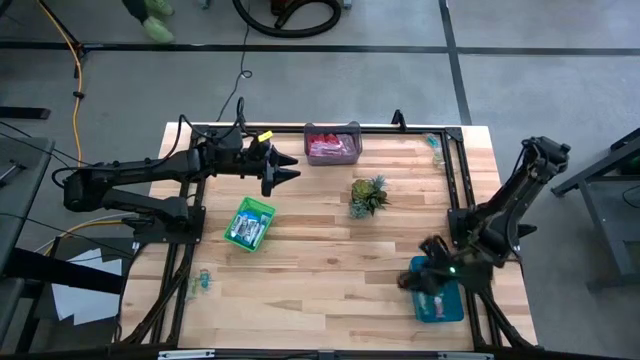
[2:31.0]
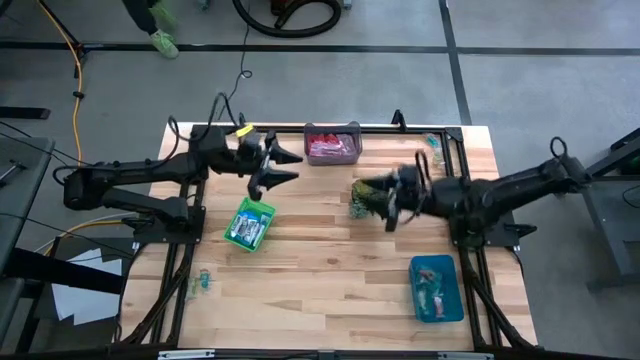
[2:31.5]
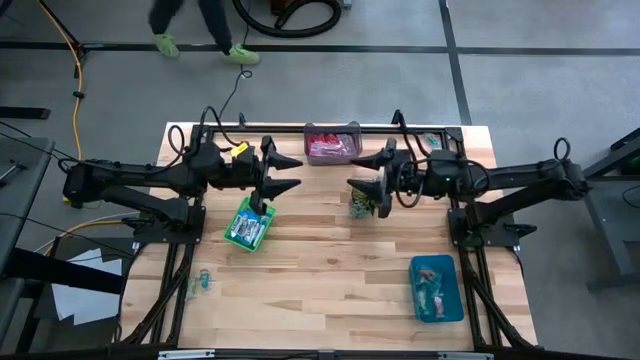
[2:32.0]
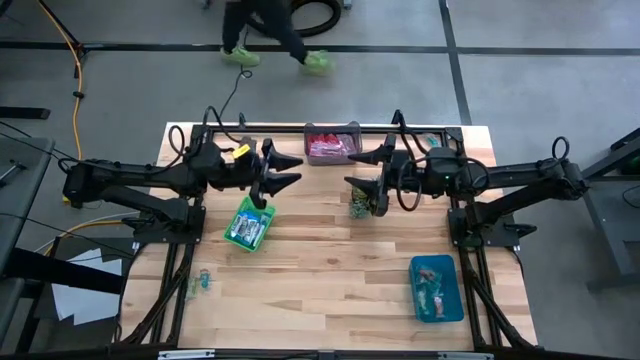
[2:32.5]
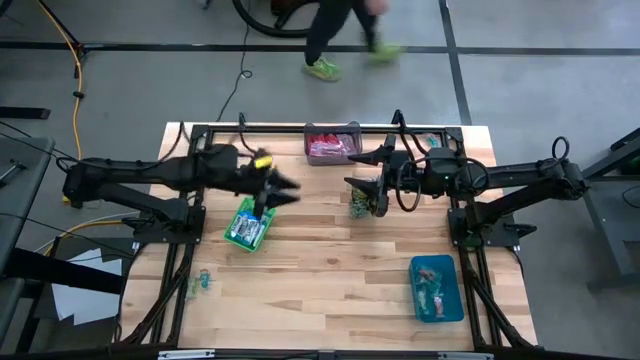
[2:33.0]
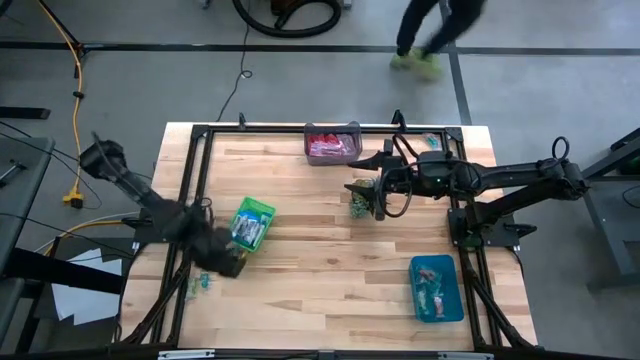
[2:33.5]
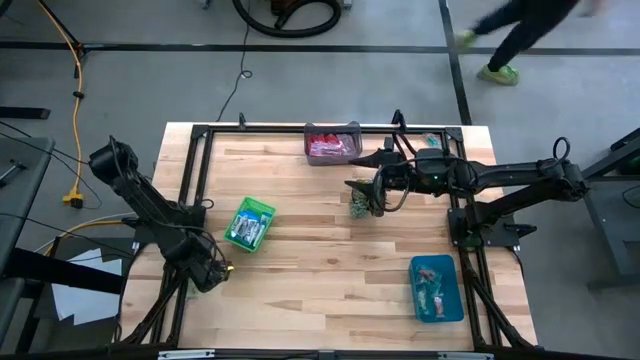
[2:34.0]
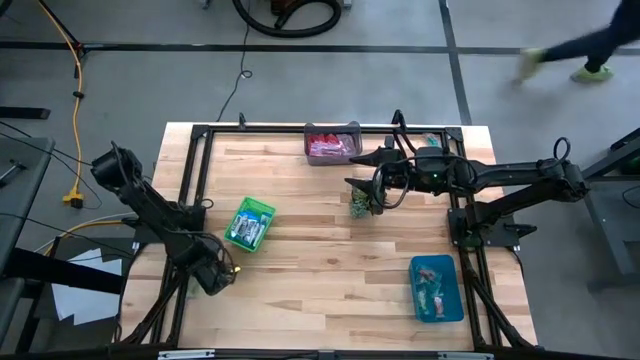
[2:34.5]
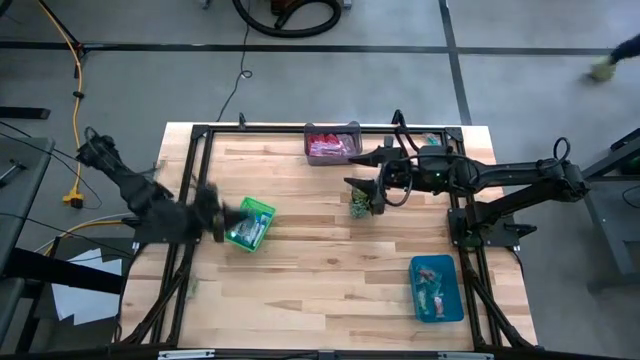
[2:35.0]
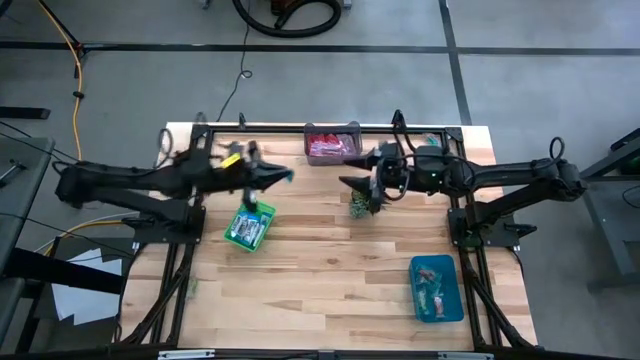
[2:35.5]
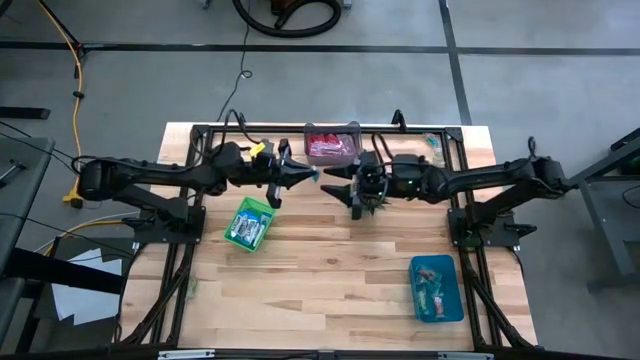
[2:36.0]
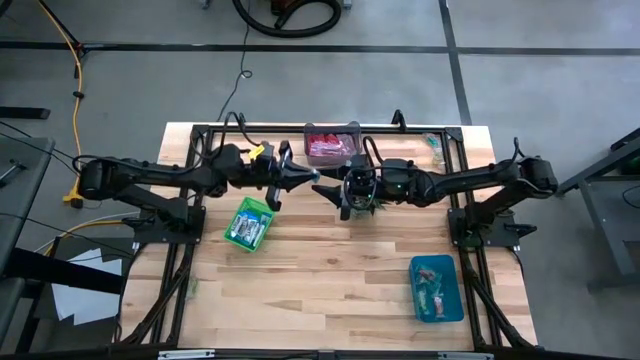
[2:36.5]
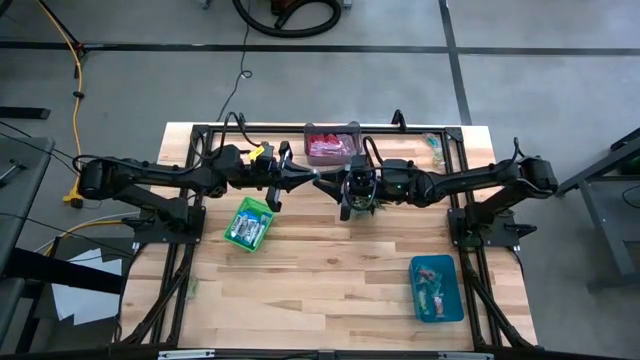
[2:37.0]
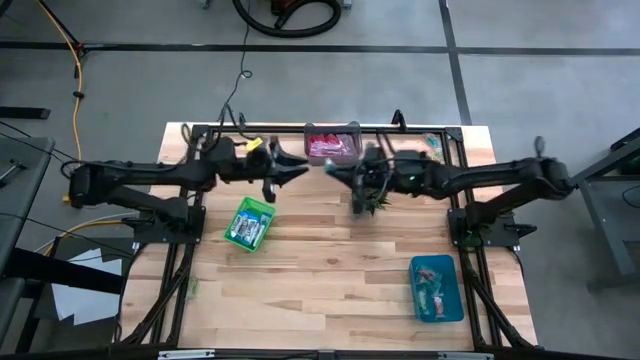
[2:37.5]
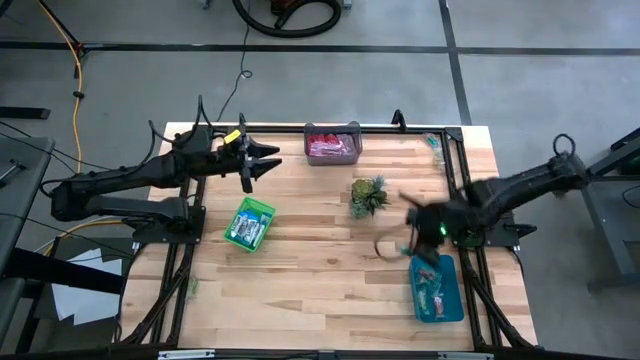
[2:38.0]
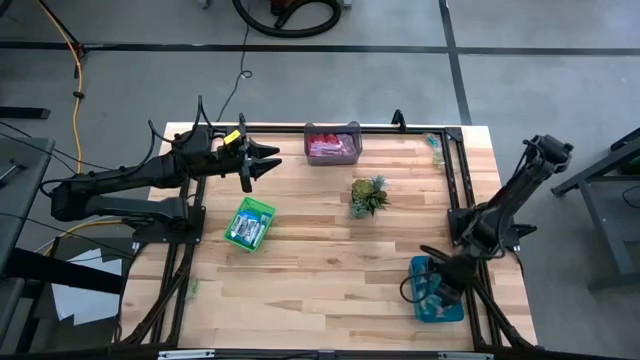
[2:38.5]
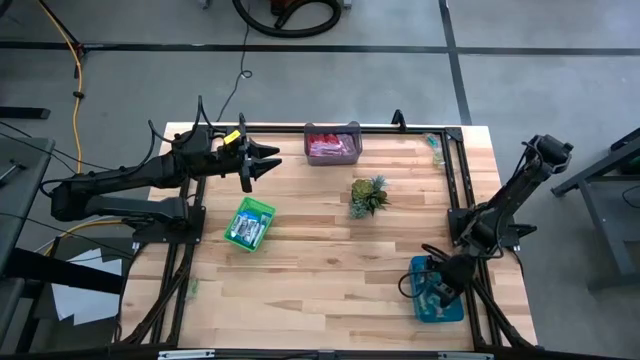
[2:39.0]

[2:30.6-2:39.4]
Task: Sort candy
Put the transparent candy into the blue bin

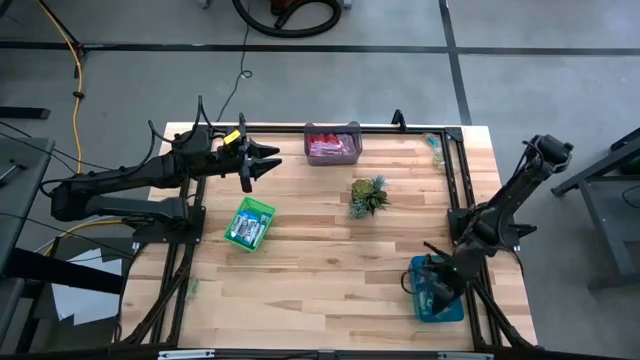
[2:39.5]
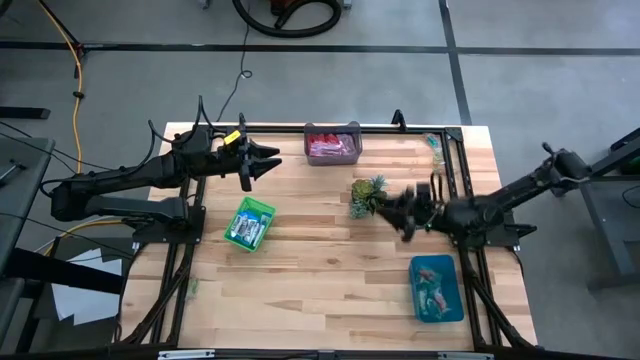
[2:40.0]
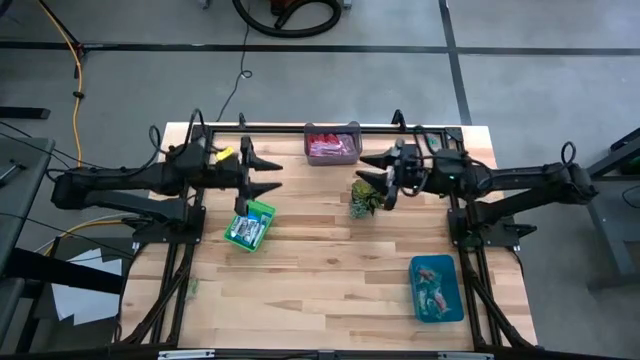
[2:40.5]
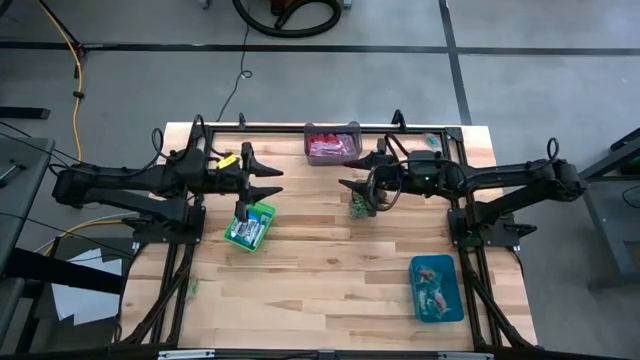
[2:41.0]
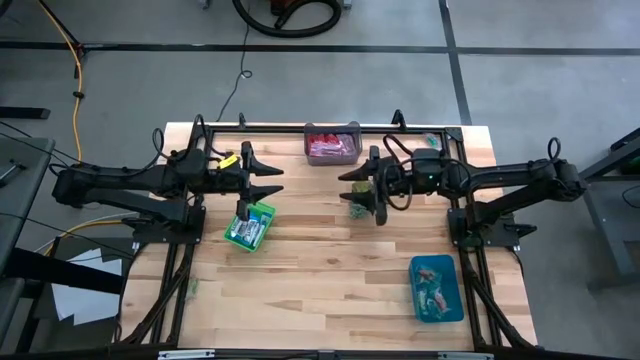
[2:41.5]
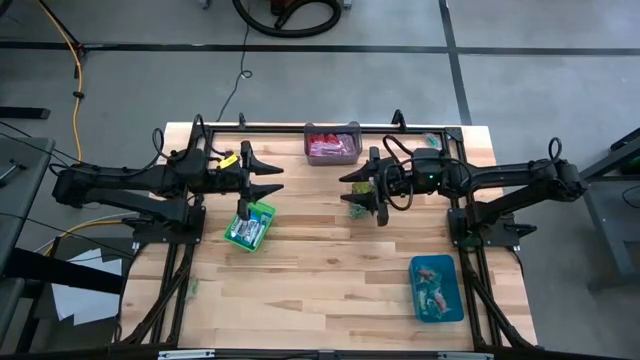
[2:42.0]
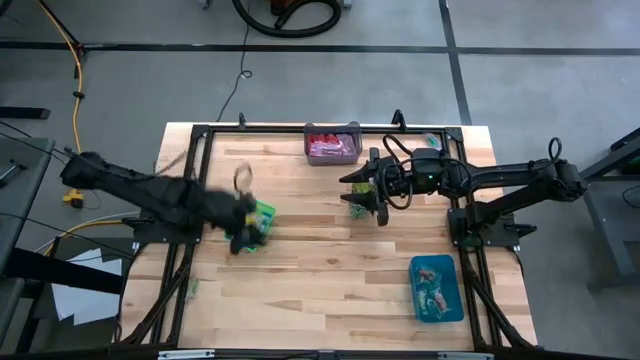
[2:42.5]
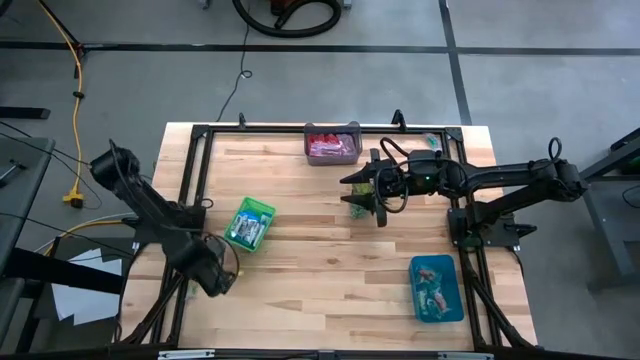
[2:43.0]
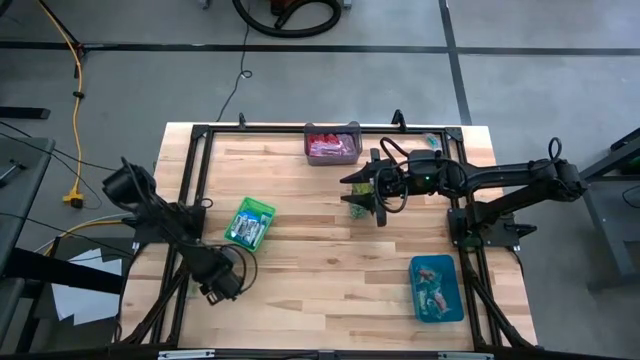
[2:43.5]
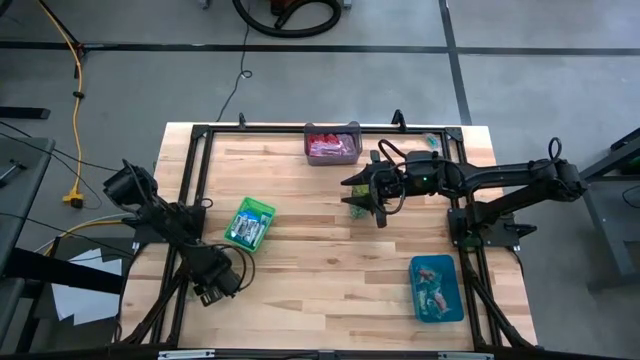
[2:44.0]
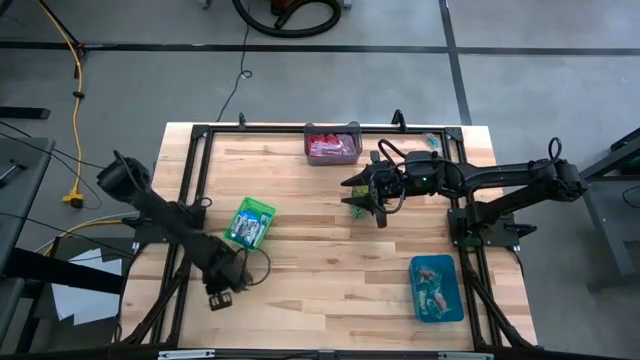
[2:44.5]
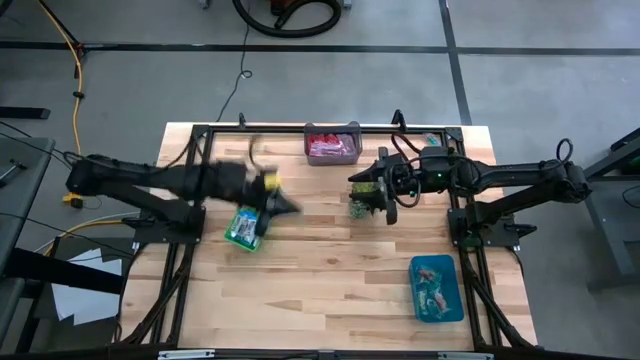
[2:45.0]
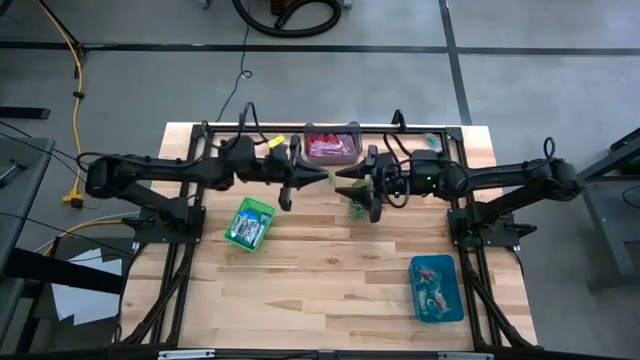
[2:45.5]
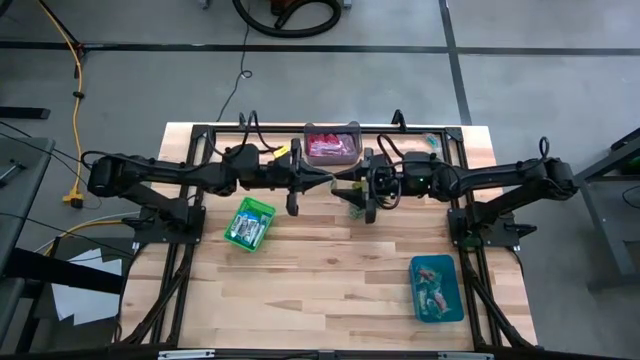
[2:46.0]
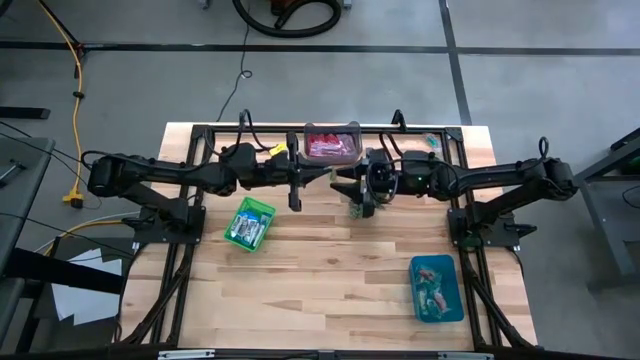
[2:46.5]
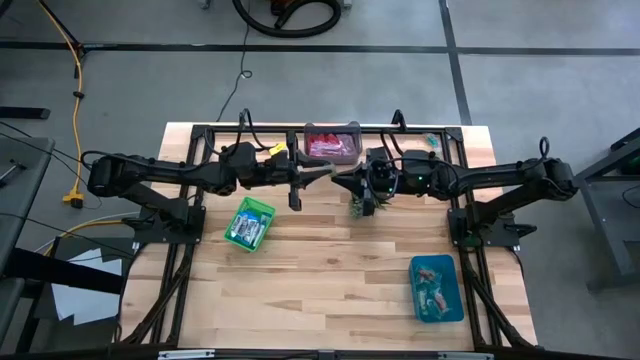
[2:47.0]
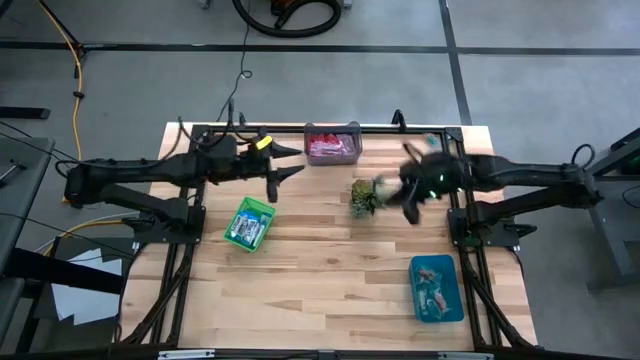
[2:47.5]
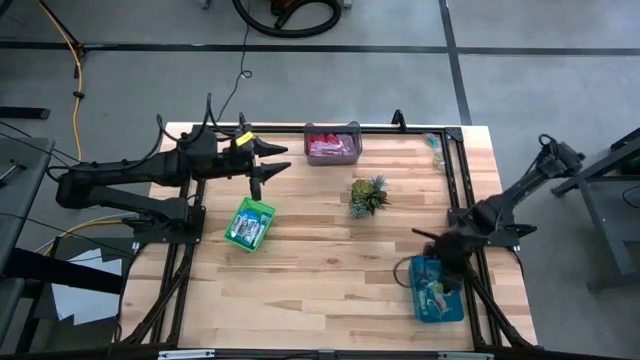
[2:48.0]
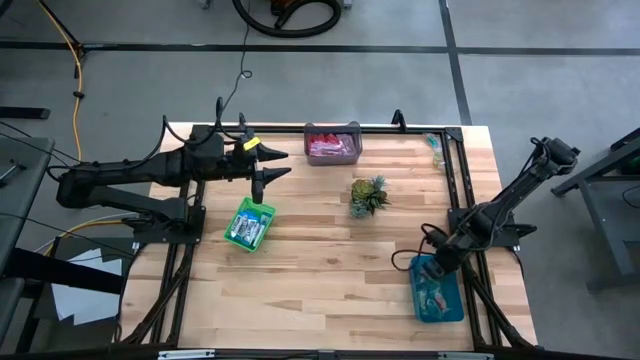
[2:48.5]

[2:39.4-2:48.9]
Put the transparent candy into the blue bin

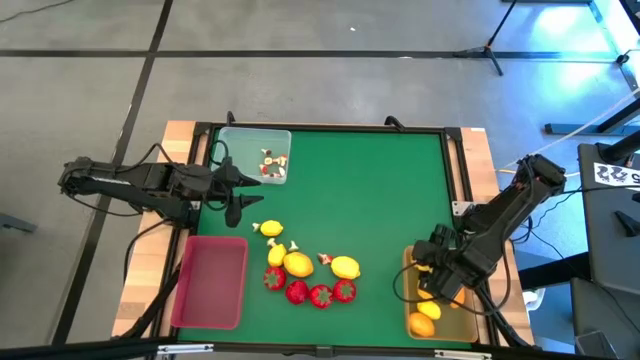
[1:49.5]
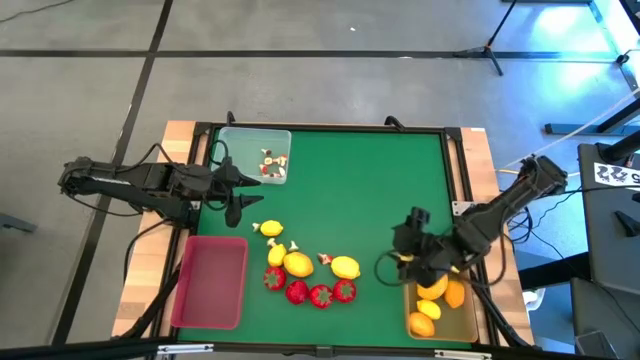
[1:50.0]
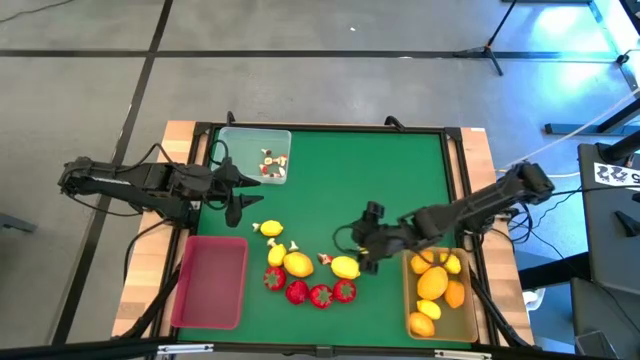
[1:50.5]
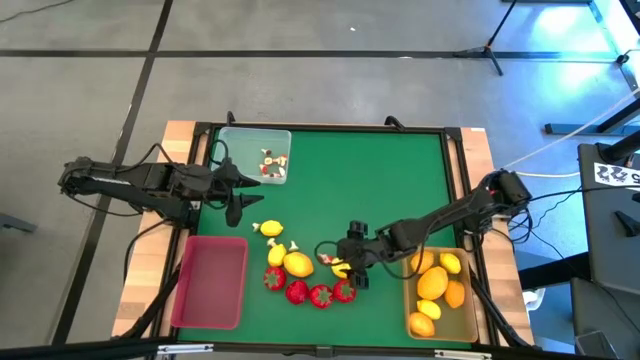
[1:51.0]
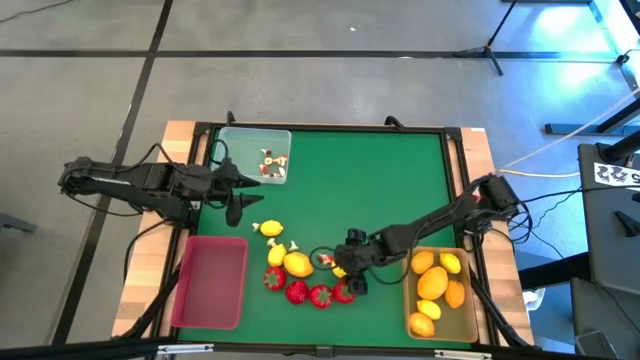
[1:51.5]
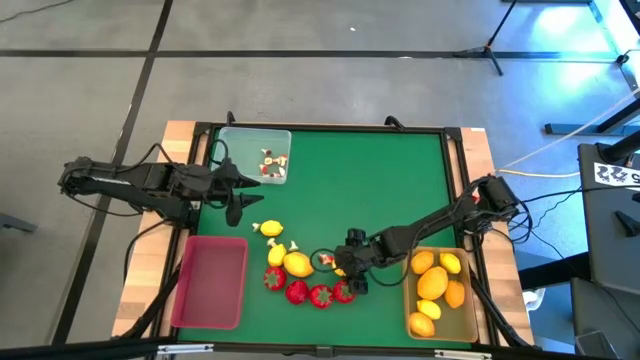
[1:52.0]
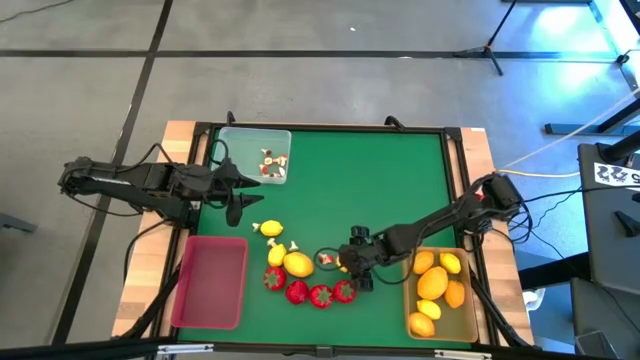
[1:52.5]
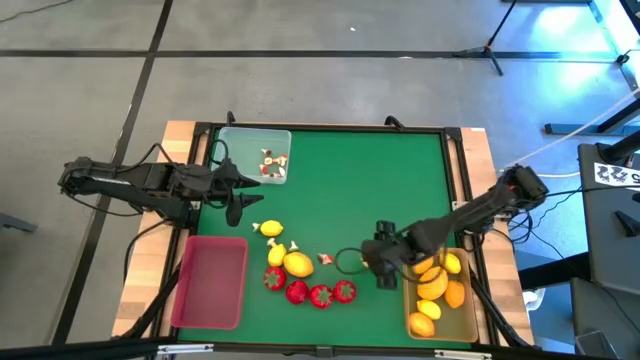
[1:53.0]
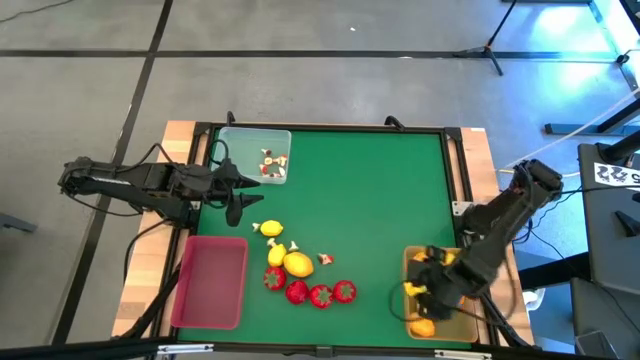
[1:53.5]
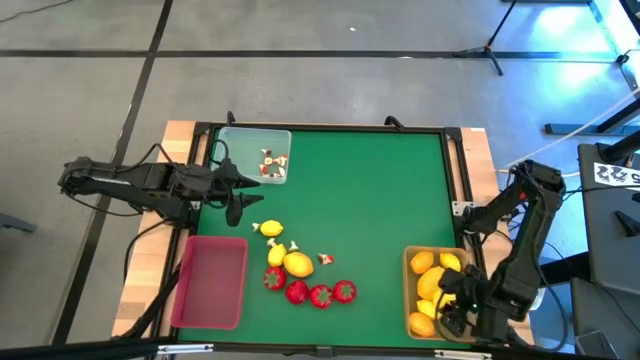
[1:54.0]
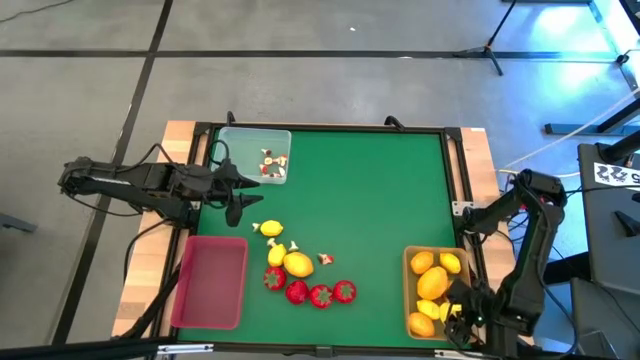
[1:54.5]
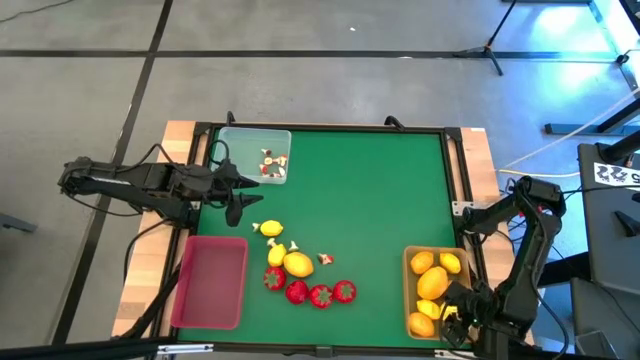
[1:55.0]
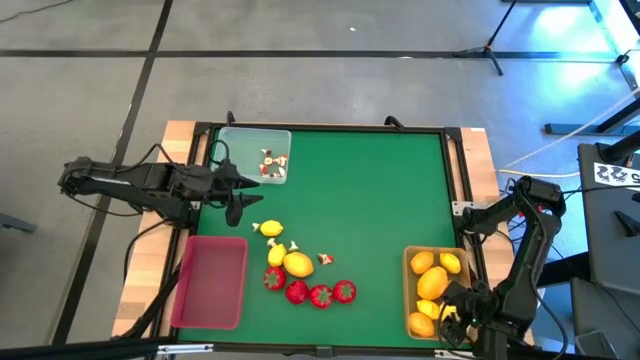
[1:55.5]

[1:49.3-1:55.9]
Task: Sort produce into baskets
Put the lemon into the orange bin
